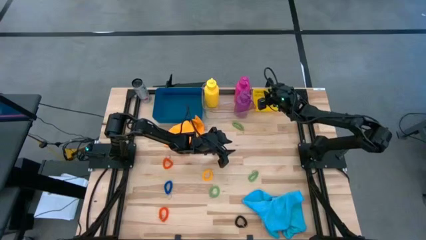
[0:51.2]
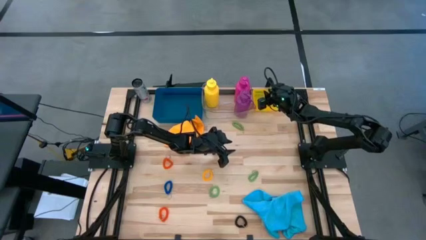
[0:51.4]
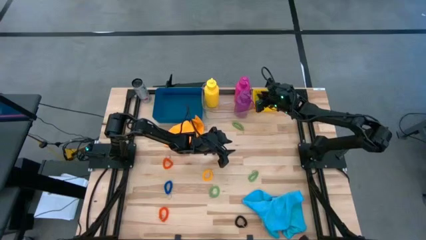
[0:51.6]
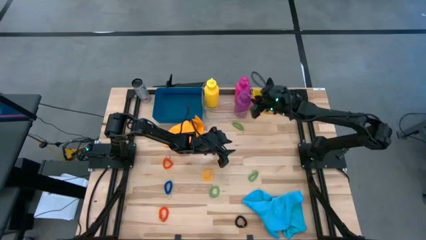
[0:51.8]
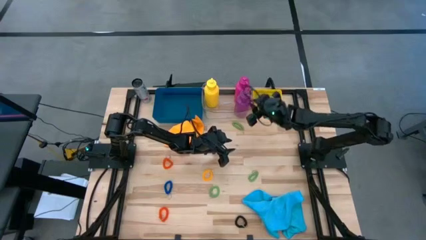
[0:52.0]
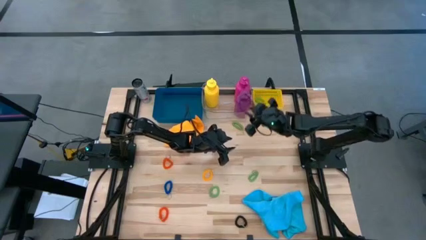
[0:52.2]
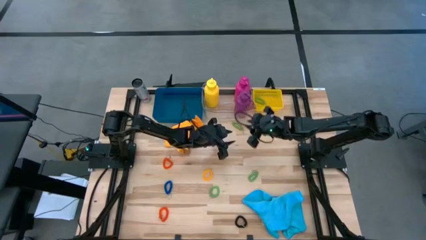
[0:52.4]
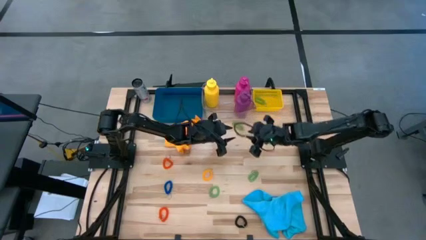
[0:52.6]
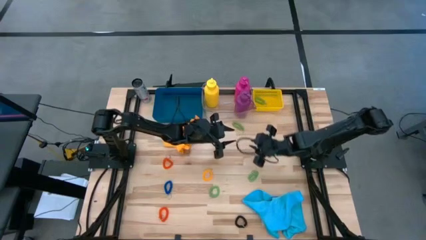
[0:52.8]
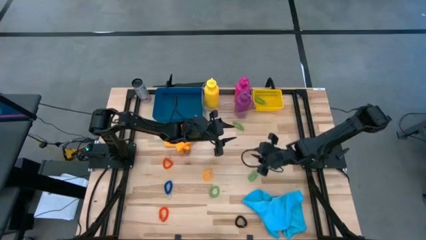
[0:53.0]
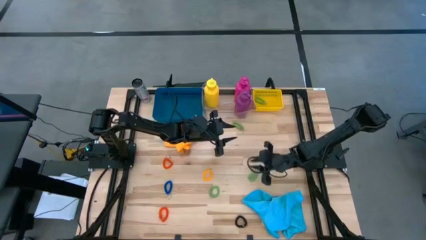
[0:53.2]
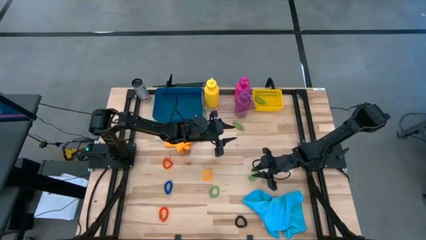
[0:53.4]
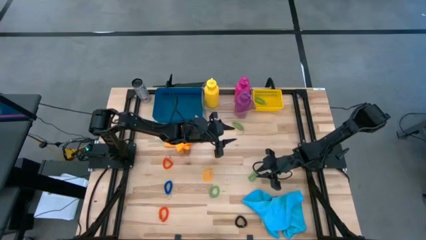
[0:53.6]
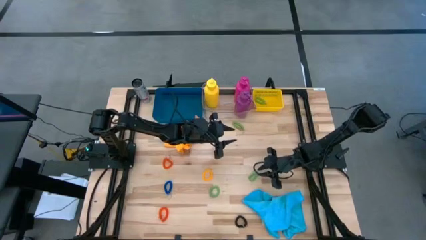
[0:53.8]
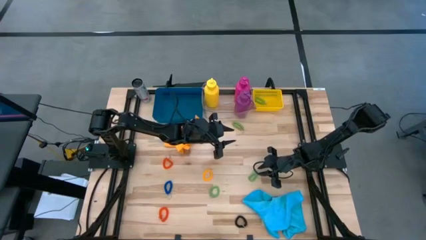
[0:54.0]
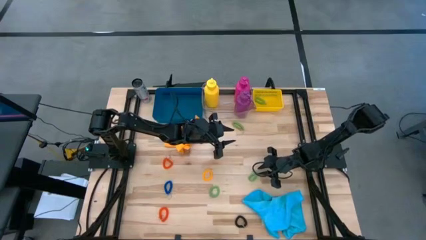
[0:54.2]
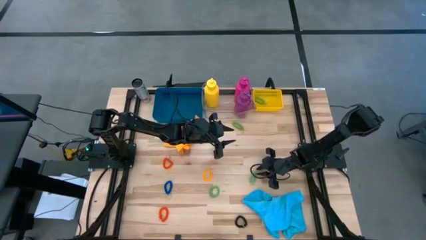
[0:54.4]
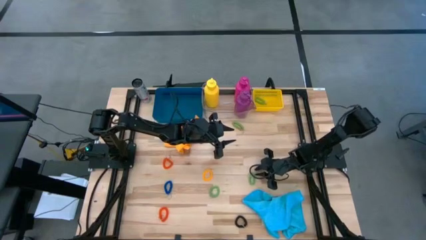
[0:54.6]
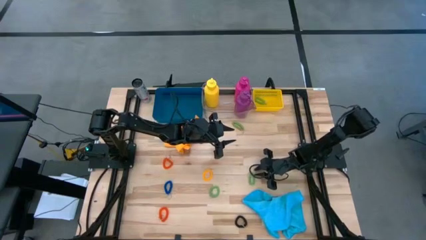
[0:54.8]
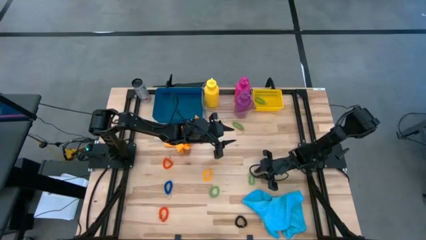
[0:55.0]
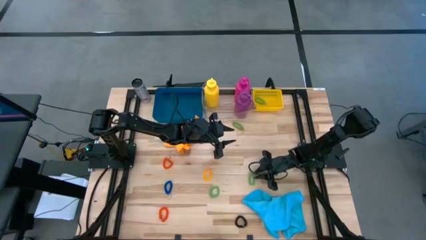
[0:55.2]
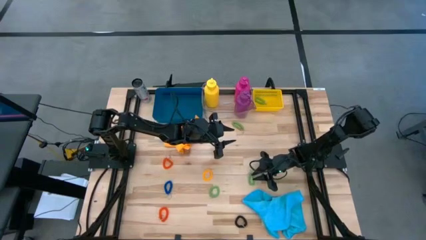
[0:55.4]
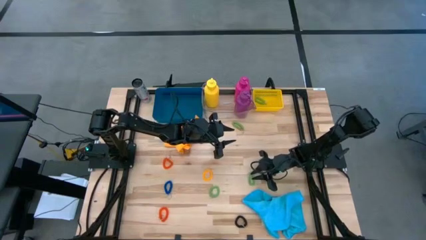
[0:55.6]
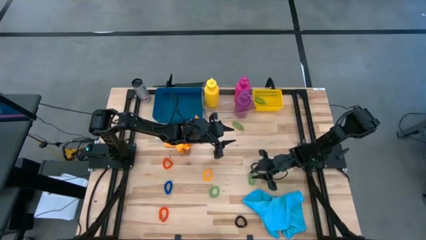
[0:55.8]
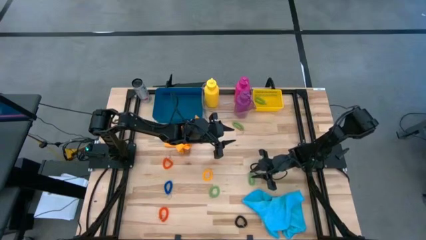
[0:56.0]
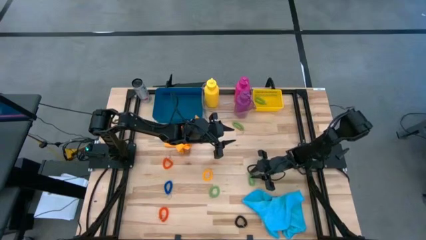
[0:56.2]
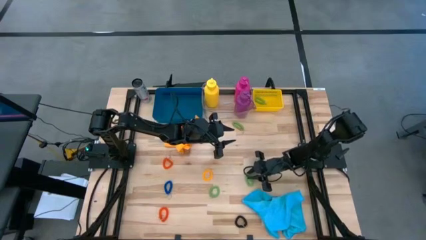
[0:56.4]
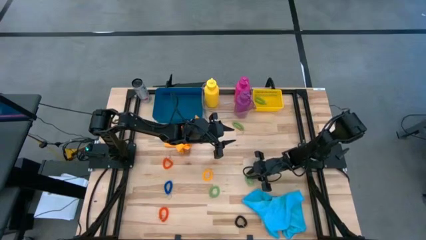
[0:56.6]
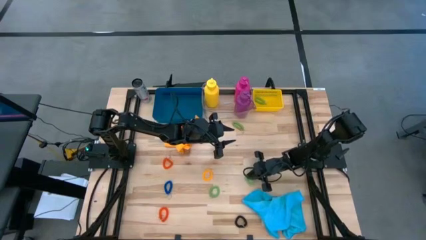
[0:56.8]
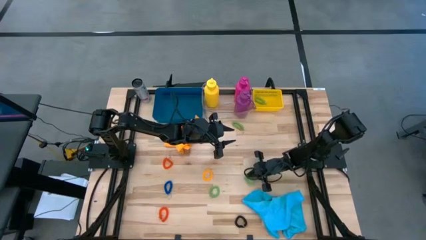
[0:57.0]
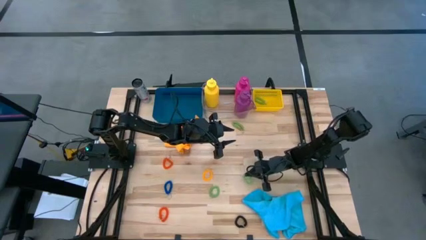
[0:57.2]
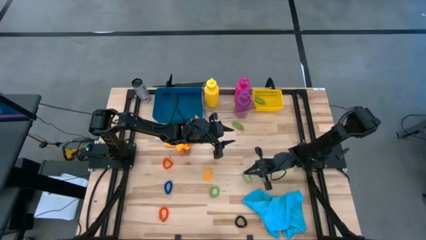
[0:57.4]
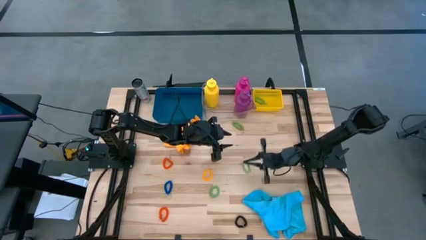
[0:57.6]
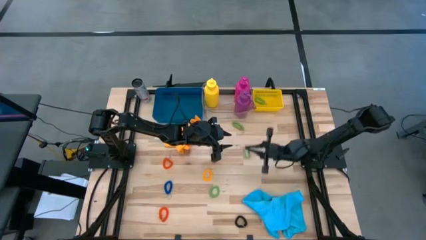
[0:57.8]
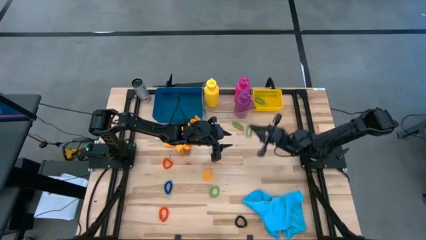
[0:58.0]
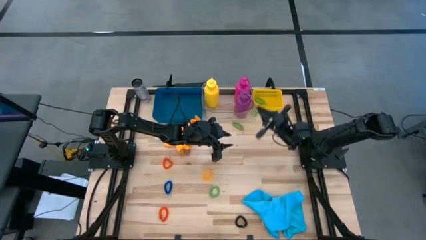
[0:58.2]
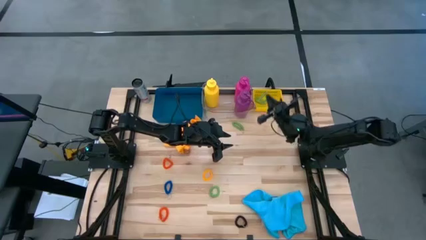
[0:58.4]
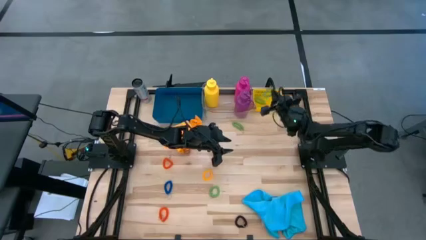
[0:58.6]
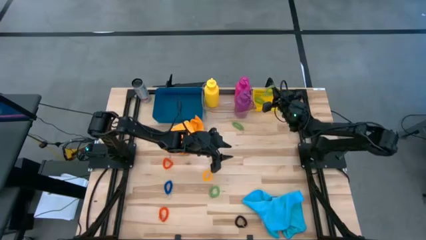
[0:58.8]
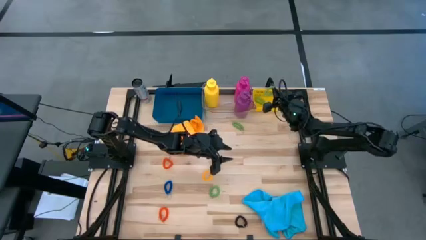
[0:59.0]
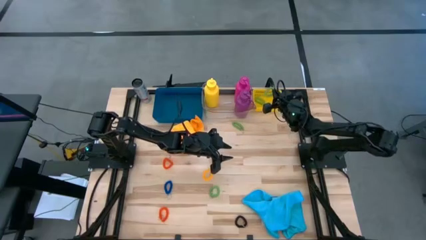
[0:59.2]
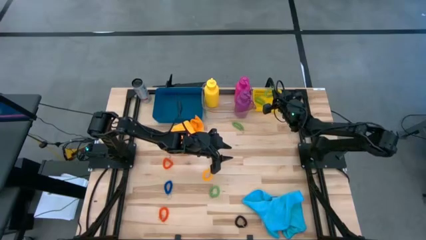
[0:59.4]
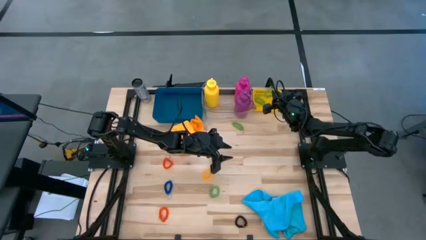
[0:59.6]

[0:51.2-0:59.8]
Task: Pick & Place Sports Items
Put the bottom right green spring keychain into the yellow bin

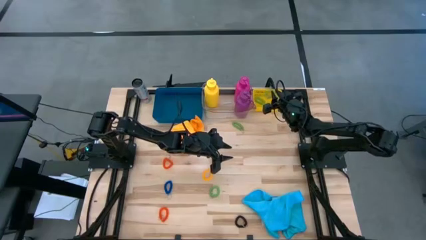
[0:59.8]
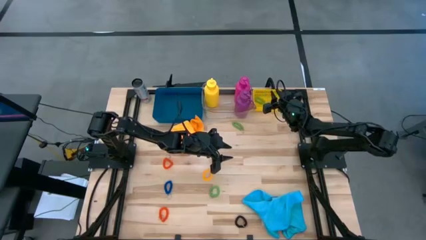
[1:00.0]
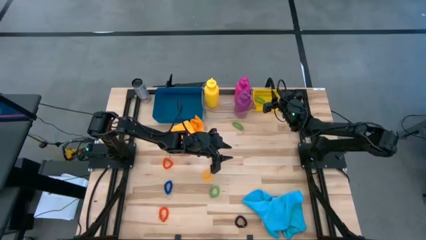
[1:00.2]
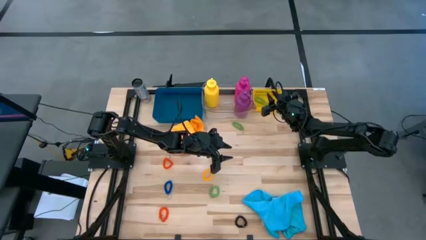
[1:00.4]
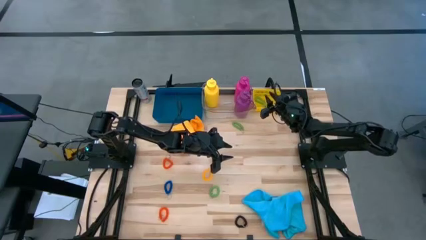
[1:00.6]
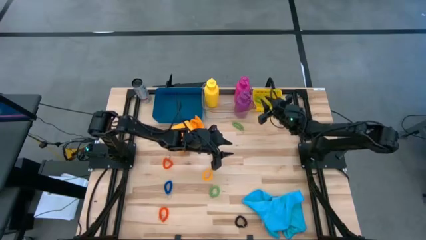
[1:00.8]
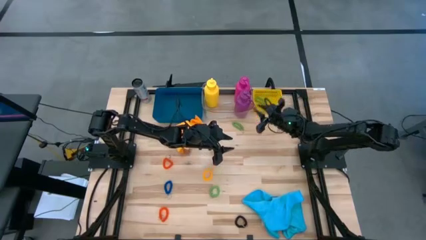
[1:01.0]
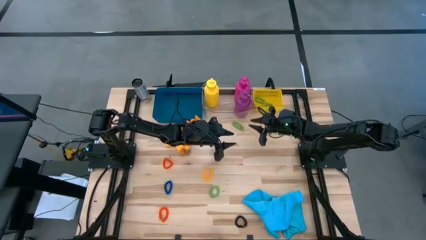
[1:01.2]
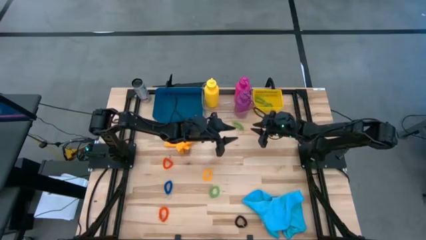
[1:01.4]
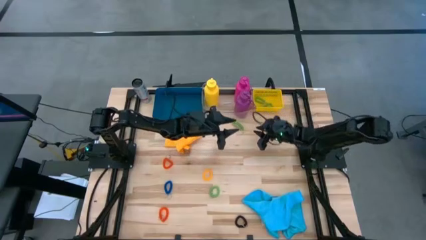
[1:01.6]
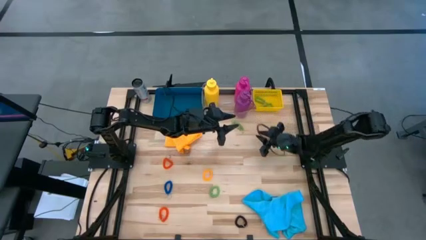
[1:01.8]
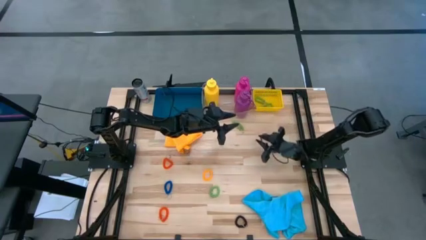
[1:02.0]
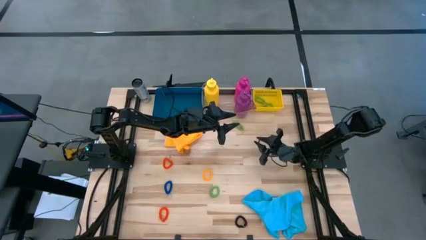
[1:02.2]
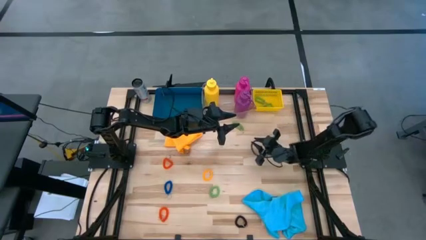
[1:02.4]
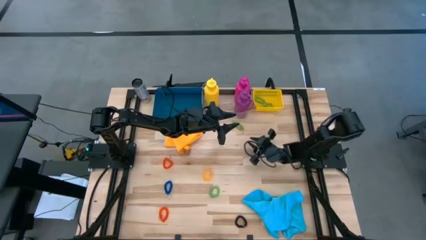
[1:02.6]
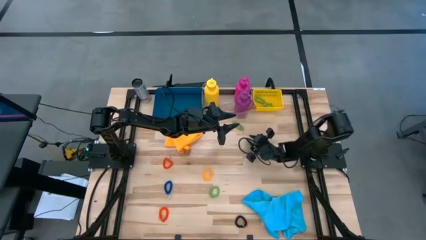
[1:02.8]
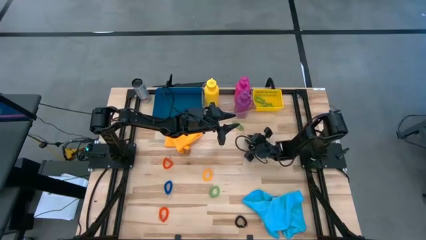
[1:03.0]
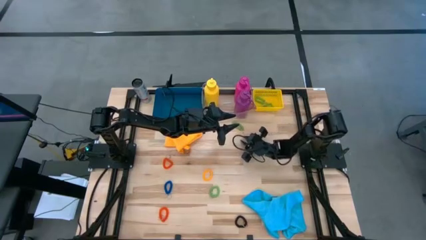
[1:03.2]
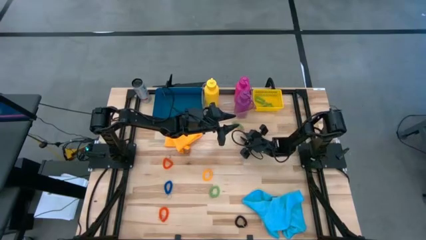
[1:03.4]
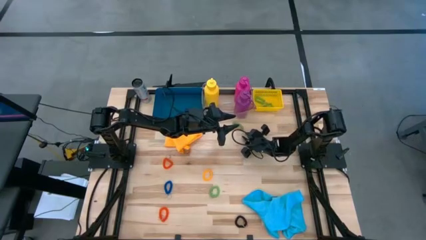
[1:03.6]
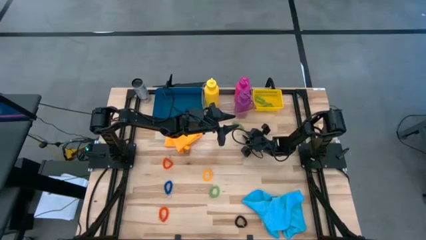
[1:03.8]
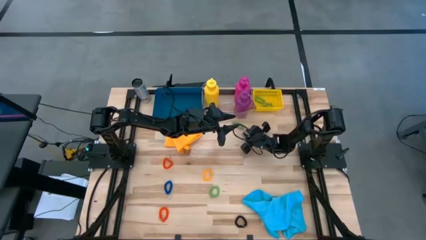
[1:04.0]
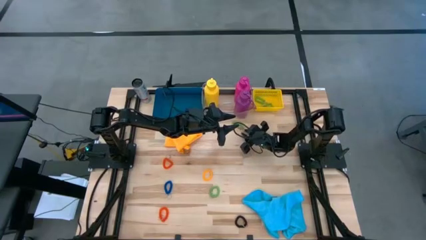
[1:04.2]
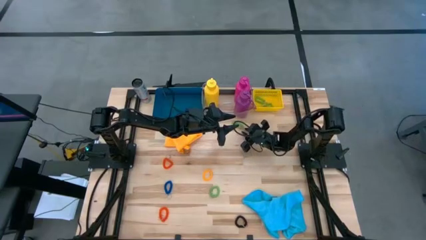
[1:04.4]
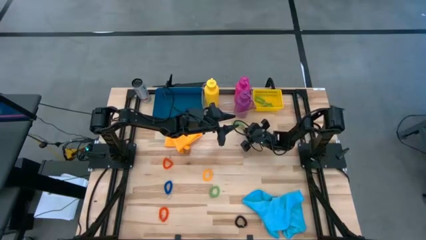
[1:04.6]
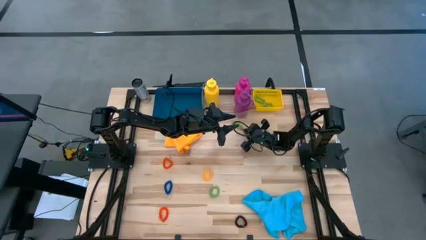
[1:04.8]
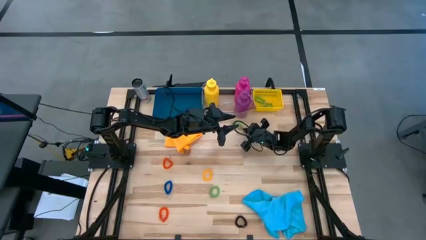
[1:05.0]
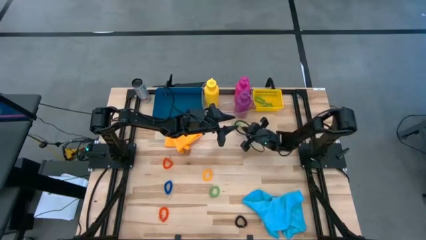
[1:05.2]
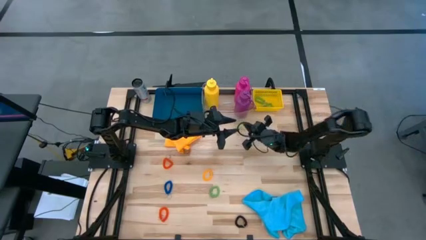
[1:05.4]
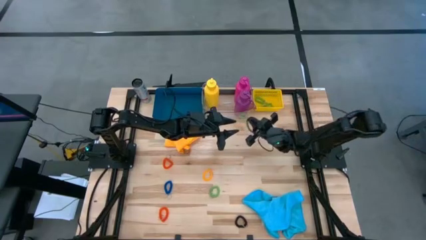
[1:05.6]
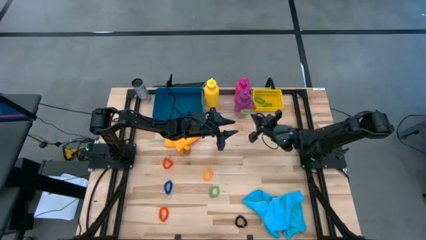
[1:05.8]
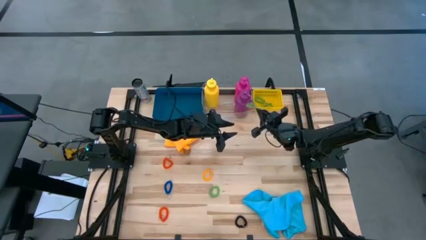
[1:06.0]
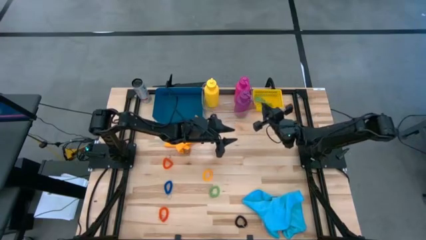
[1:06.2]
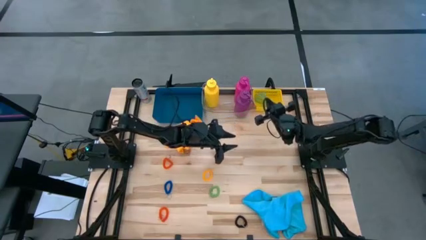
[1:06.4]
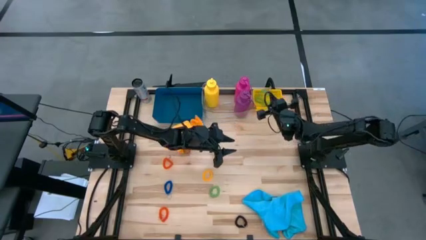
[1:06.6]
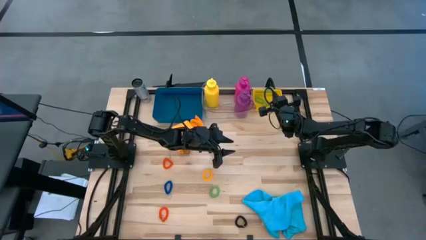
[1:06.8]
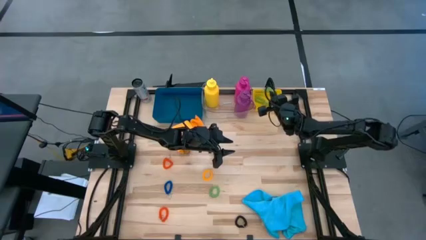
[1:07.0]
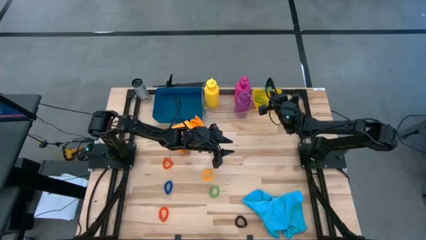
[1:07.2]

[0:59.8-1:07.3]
Put the top green spring keychain into the yellow bin
